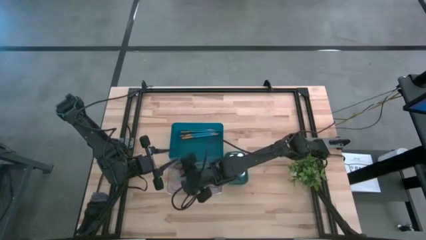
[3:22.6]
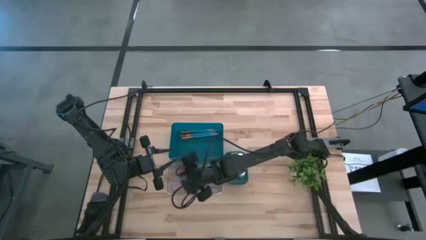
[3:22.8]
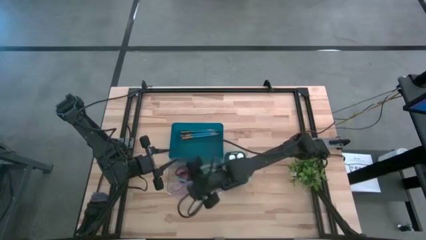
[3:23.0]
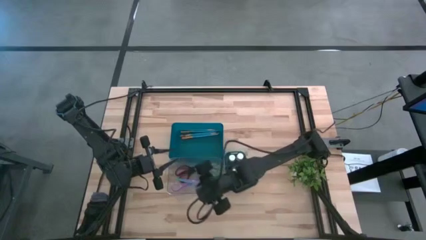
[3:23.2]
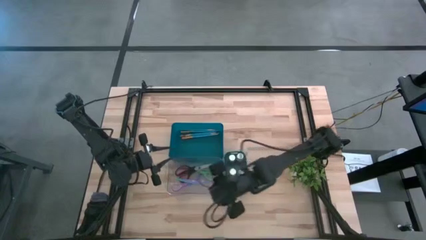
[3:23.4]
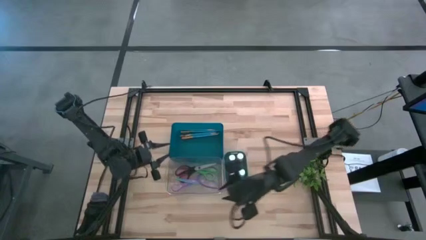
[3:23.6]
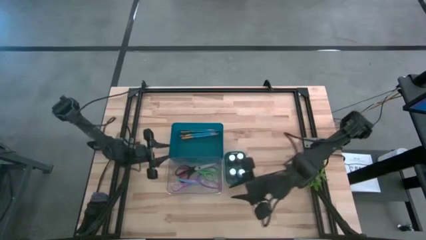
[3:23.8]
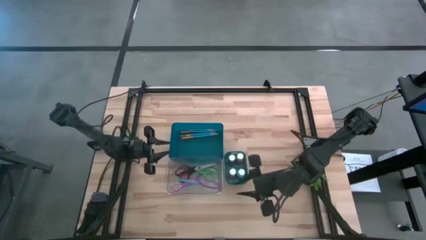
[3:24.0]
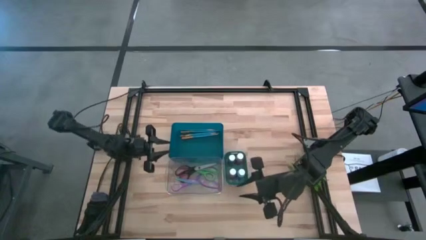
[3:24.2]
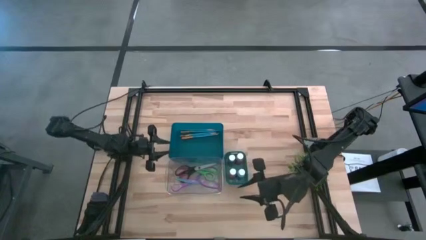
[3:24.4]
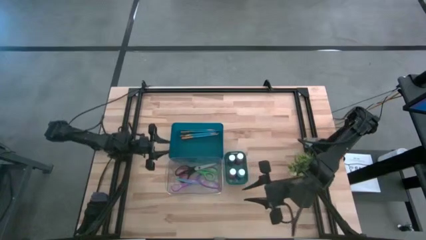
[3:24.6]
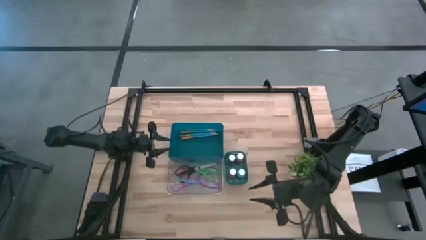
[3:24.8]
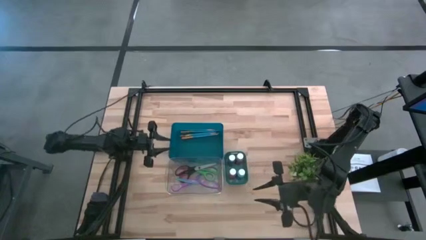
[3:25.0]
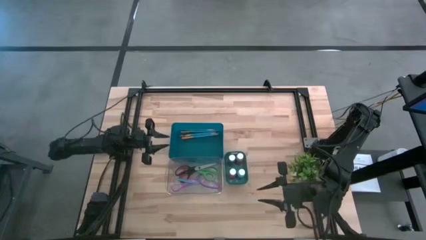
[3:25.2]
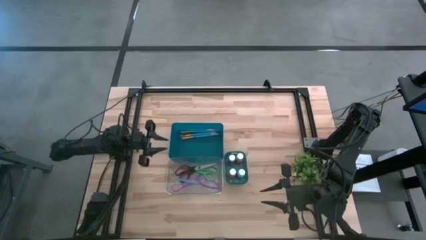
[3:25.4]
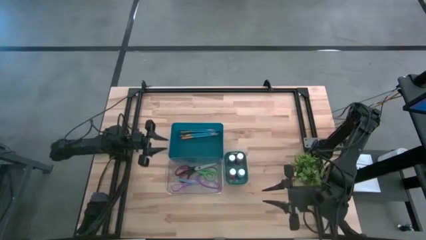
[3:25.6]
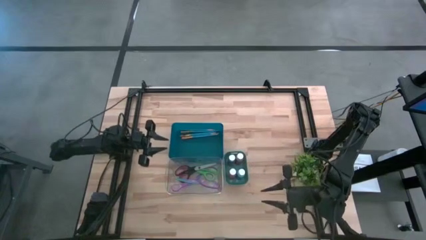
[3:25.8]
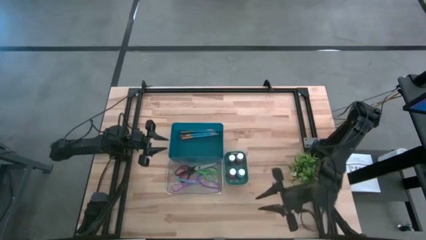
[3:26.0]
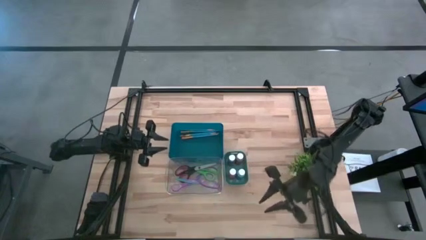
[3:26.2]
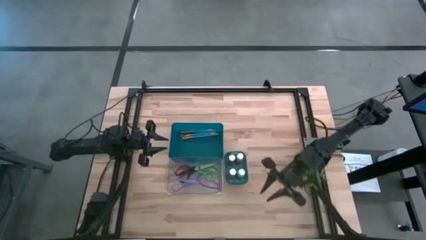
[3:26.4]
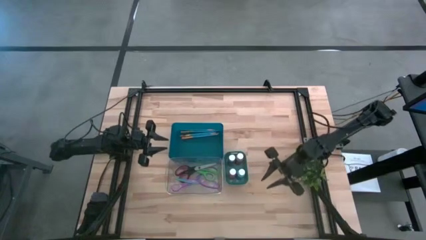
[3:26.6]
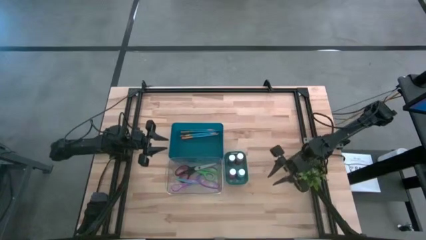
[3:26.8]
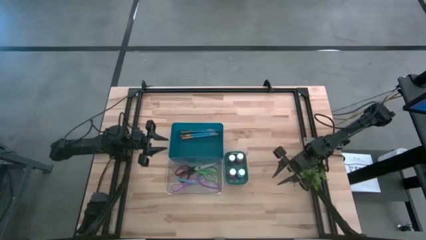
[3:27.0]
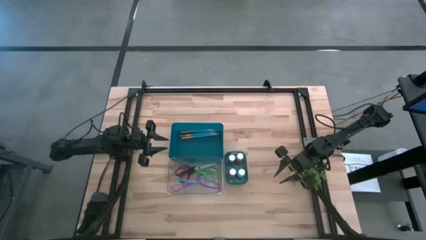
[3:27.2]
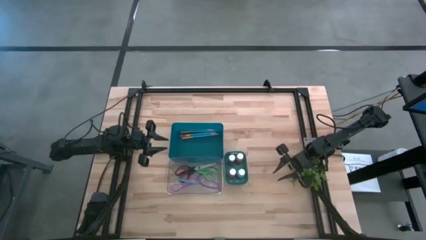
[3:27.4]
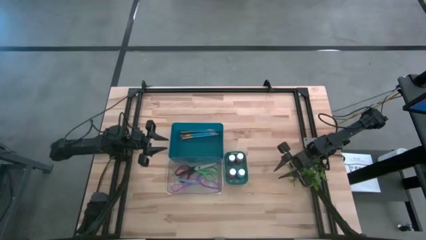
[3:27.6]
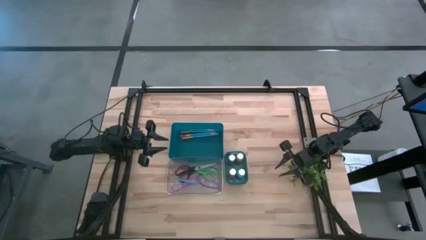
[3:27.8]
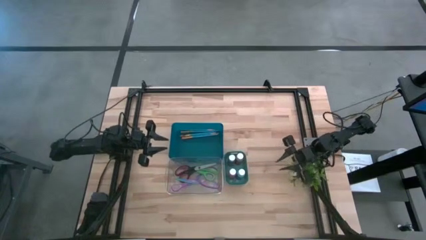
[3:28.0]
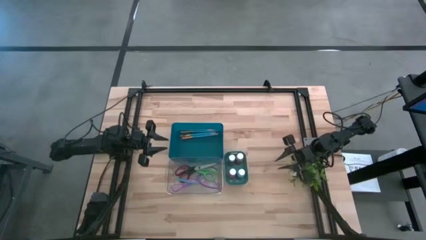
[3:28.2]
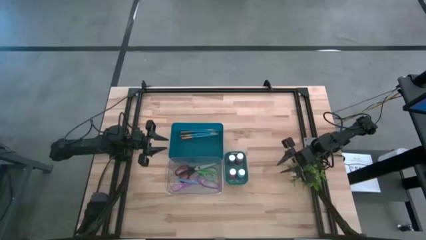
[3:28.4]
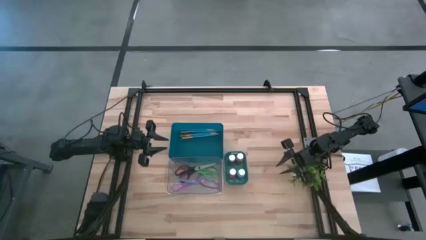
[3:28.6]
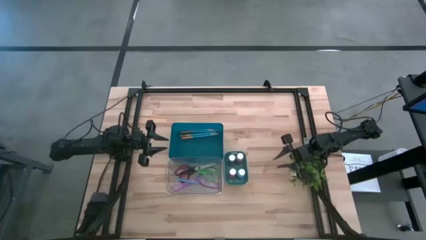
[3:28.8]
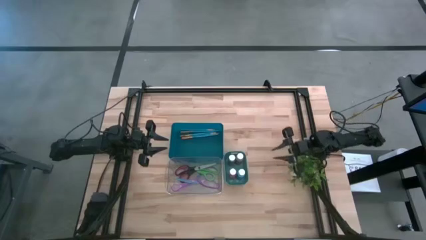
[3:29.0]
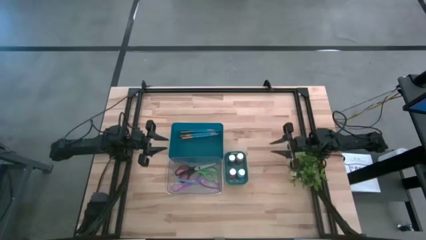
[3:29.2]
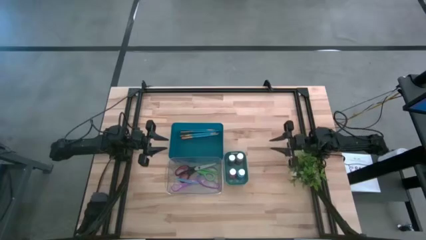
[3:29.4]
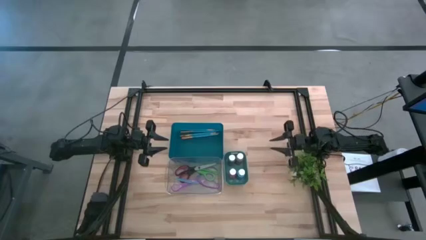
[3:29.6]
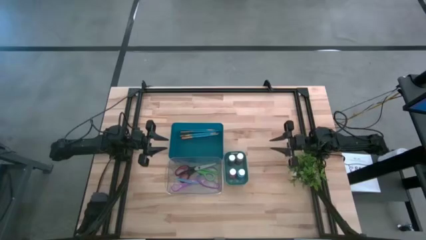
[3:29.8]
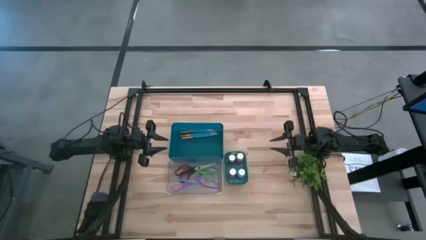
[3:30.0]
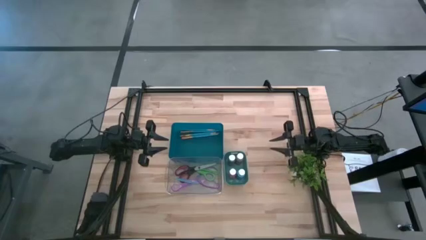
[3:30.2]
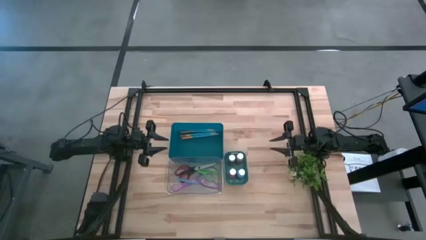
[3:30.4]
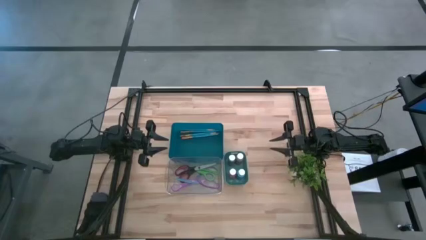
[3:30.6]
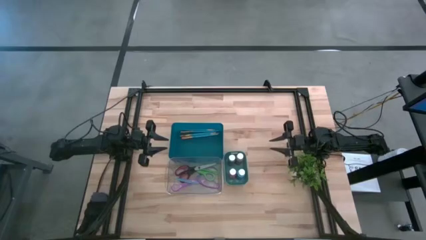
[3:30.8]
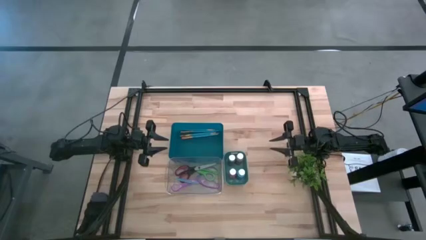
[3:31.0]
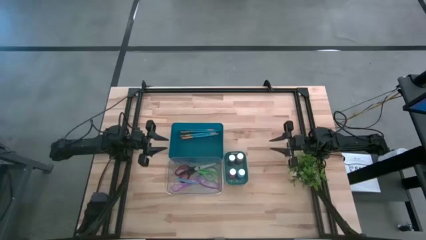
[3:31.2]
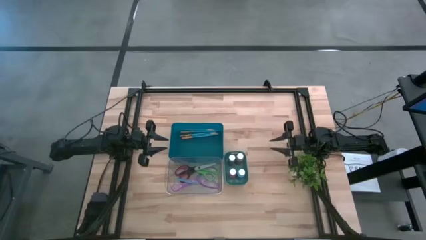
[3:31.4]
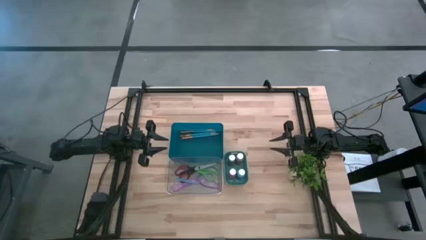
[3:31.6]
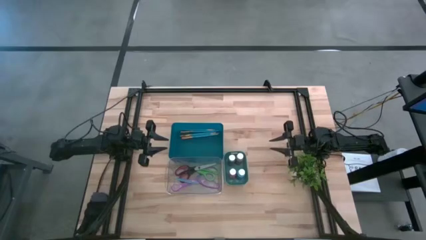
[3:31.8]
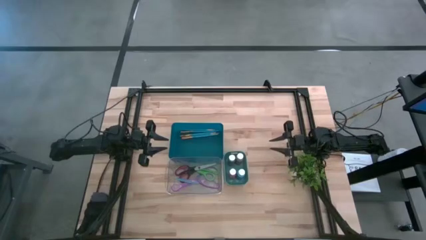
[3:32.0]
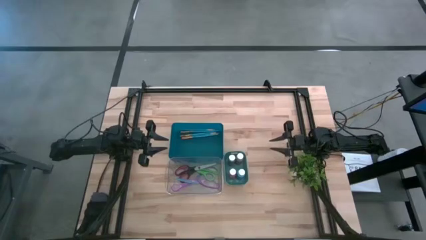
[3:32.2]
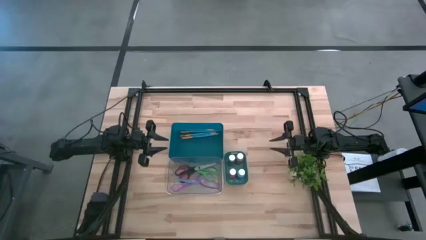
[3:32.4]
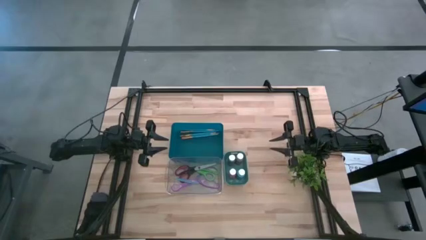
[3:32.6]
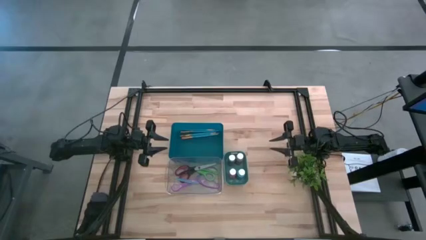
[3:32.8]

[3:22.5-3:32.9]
Task: Pick & Place Paint Supplies
Return to Home Position

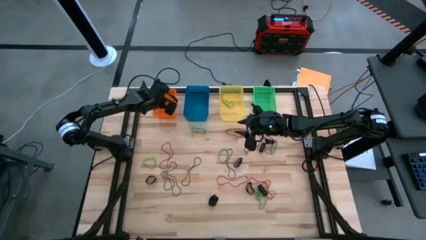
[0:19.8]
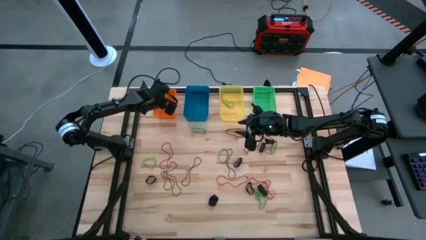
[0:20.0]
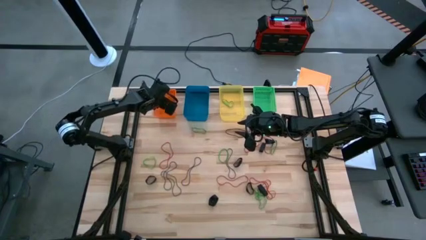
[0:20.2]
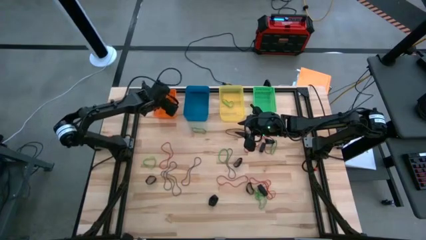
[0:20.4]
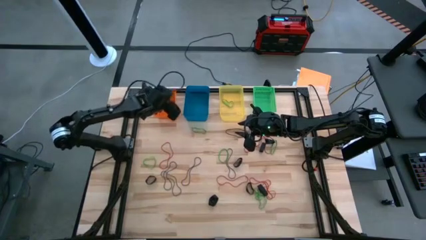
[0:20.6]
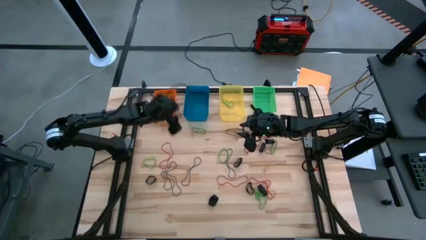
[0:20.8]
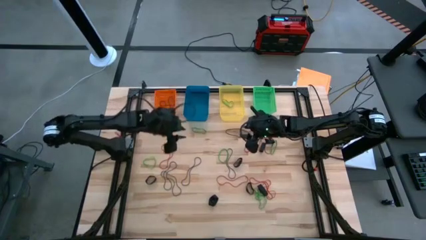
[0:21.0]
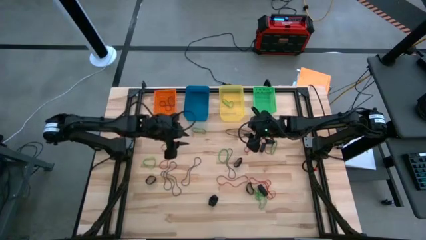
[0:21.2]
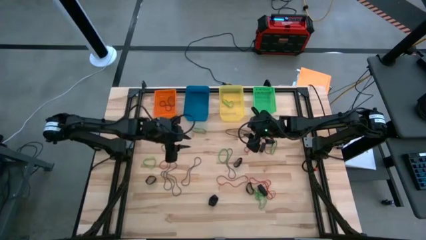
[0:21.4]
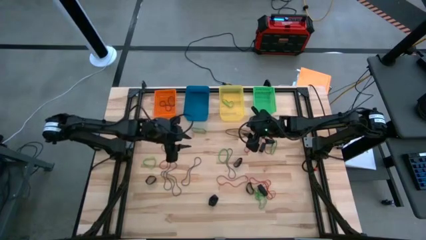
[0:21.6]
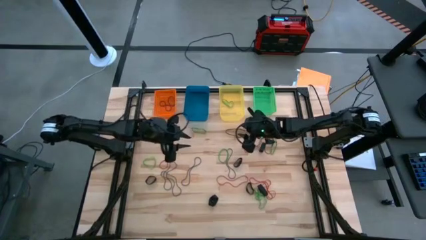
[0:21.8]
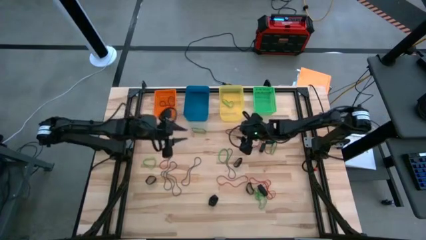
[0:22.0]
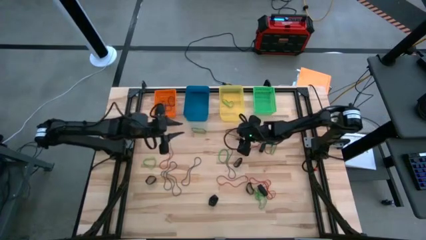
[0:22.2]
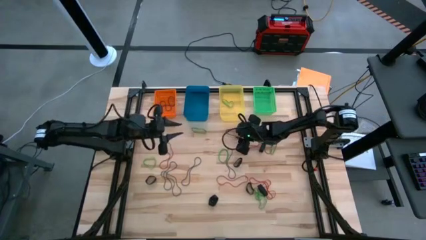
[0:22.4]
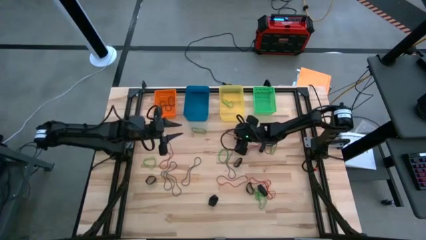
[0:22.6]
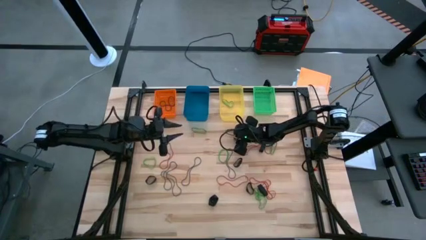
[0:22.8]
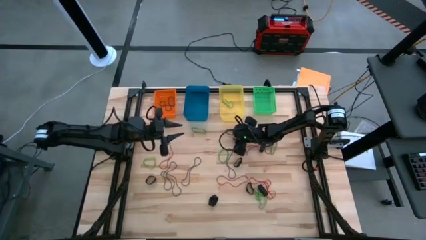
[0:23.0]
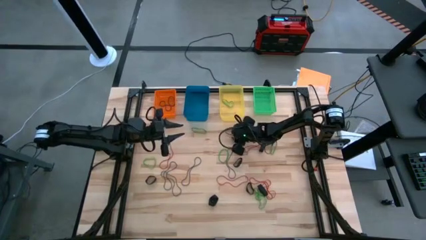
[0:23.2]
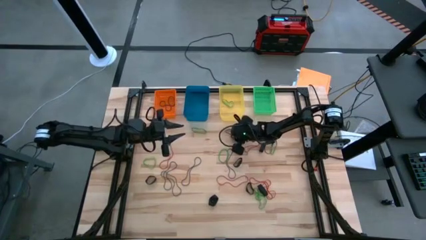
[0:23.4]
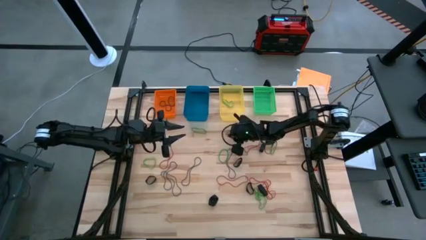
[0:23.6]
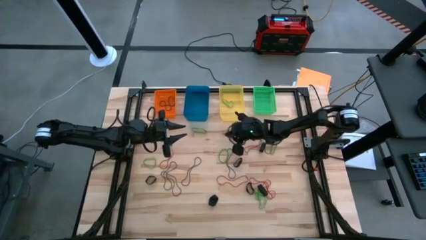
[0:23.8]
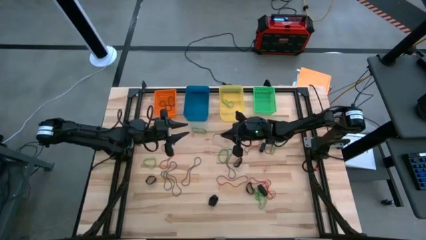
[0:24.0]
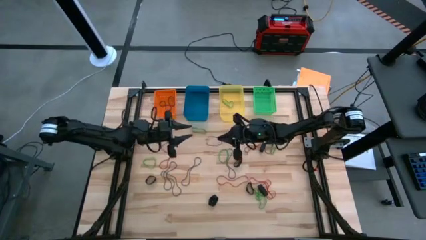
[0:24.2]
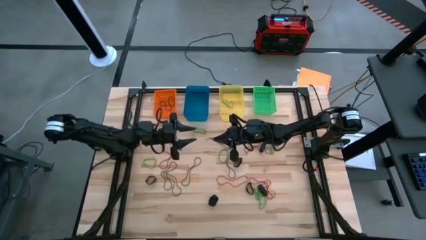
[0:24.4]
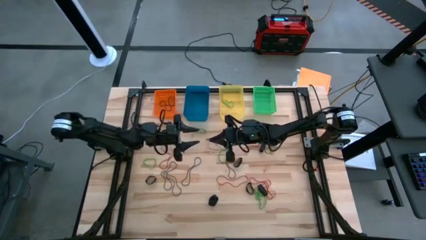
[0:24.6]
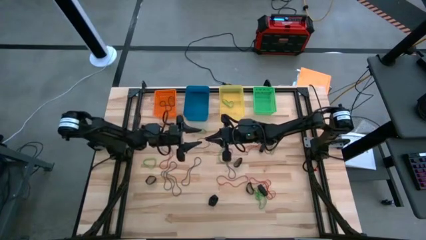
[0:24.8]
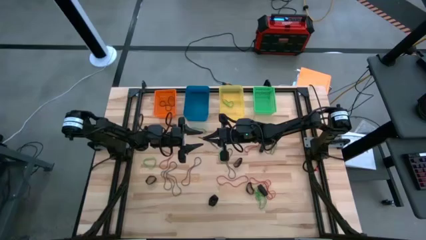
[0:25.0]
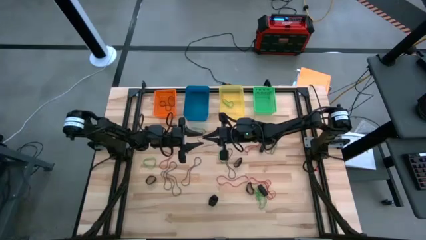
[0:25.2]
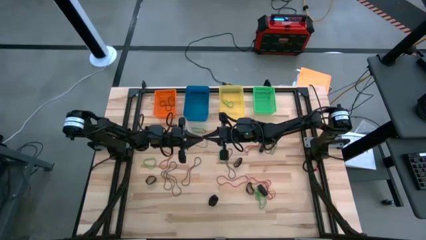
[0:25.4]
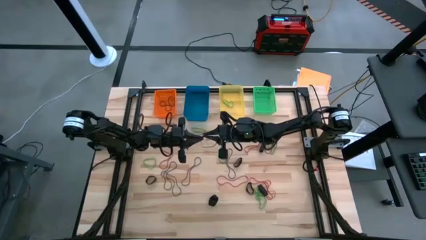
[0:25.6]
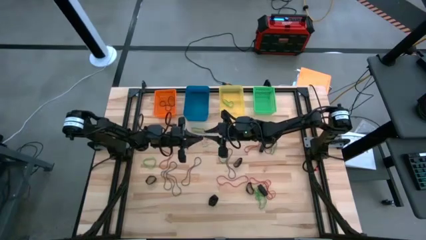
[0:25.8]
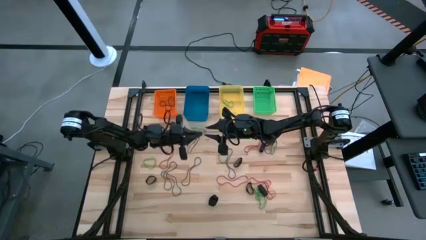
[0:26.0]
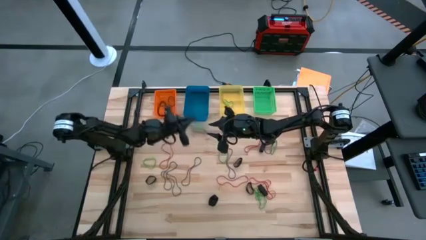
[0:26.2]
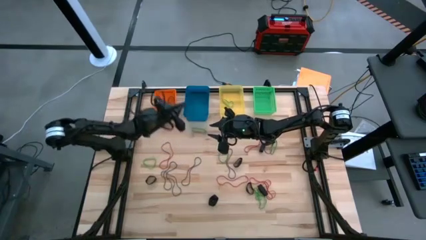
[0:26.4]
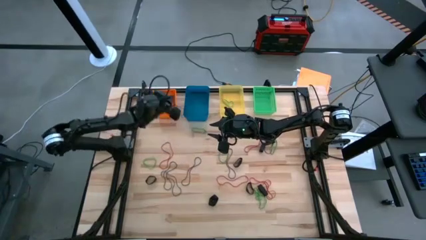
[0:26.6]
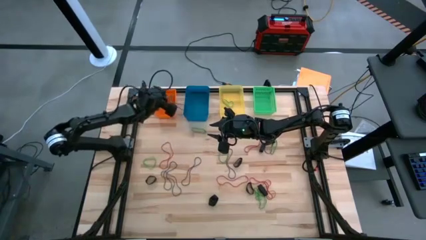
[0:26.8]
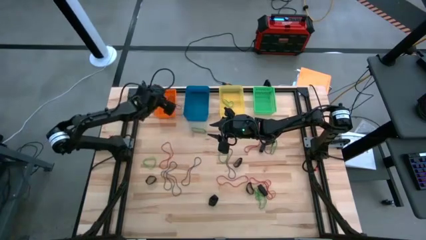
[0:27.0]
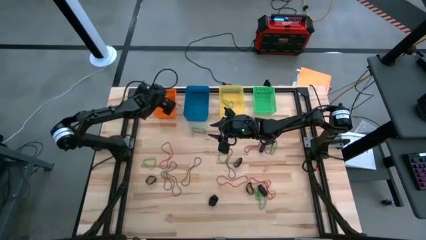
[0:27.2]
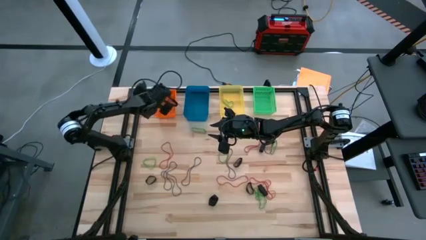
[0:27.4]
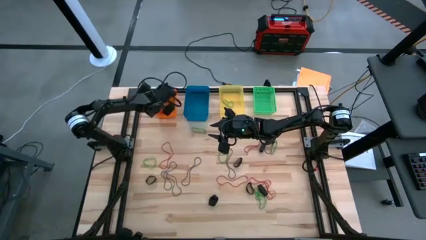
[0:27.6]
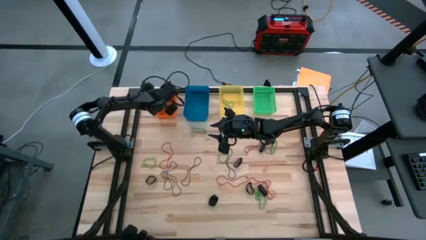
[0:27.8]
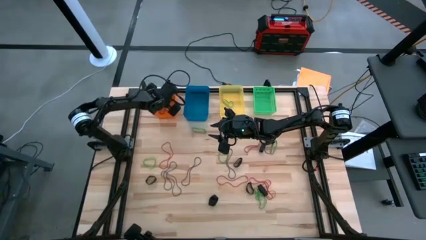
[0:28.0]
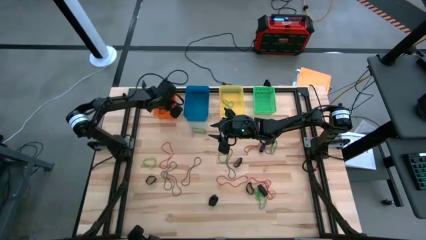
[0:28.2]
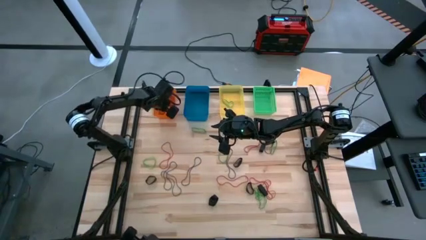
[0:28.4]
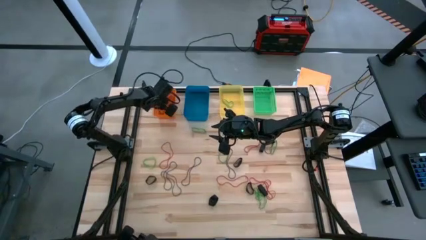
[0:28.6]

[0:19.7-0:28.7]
Task: Sort rubber bands into baskets
Put the violet rubber band into the orange bin
